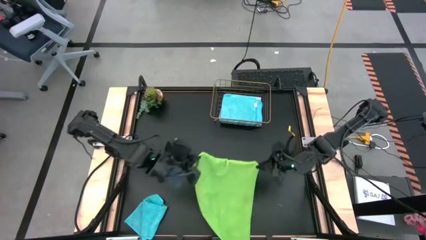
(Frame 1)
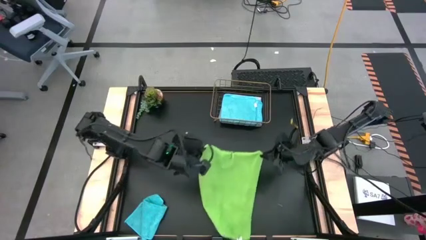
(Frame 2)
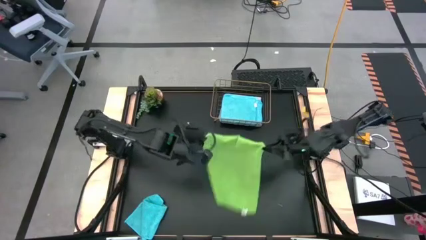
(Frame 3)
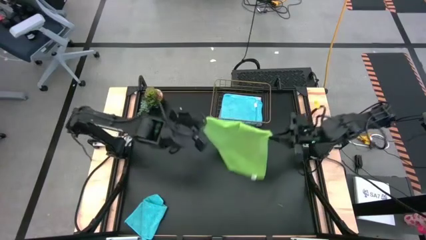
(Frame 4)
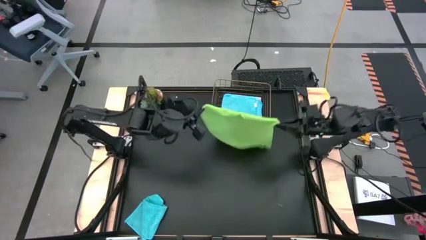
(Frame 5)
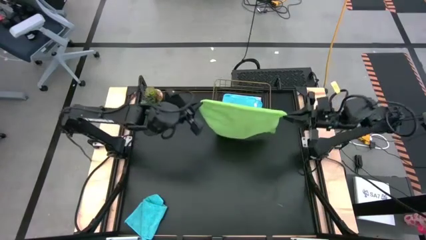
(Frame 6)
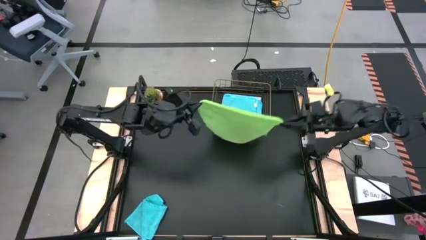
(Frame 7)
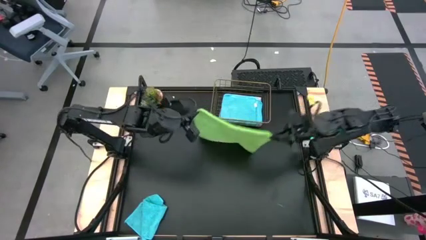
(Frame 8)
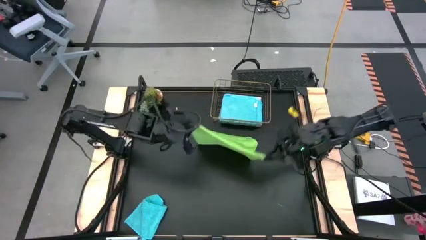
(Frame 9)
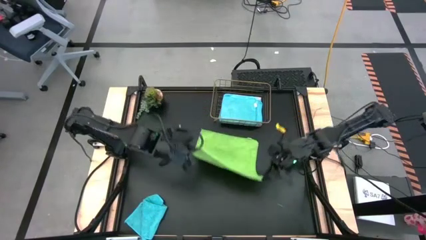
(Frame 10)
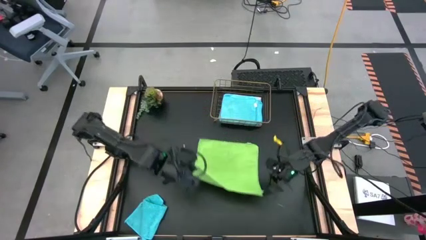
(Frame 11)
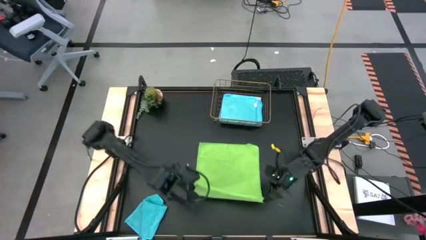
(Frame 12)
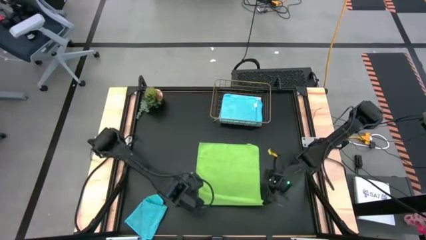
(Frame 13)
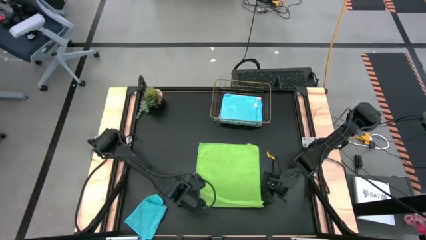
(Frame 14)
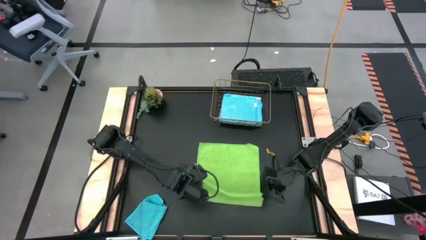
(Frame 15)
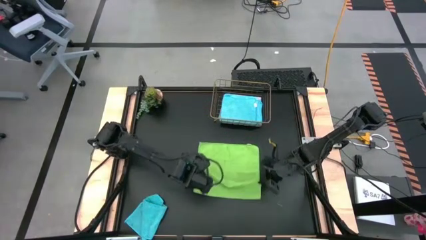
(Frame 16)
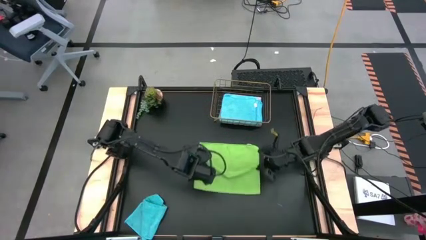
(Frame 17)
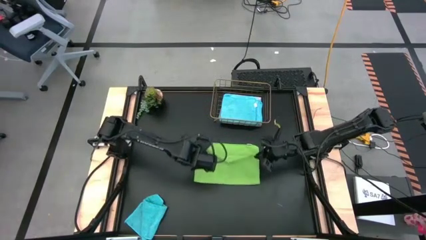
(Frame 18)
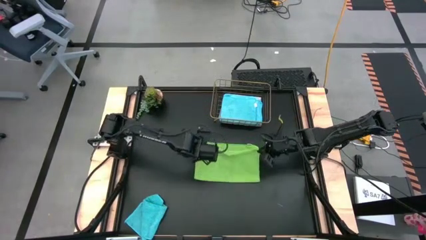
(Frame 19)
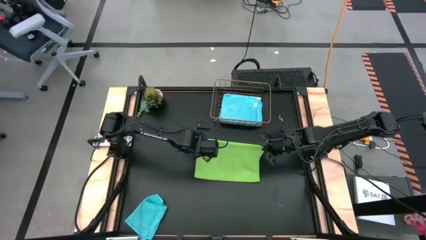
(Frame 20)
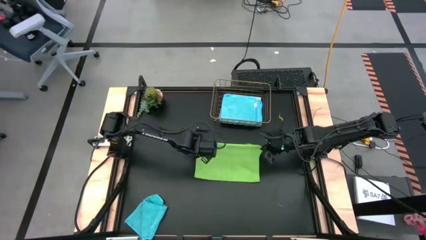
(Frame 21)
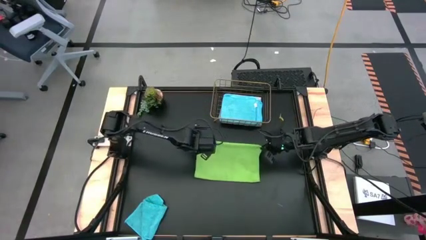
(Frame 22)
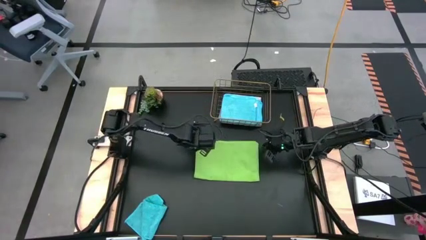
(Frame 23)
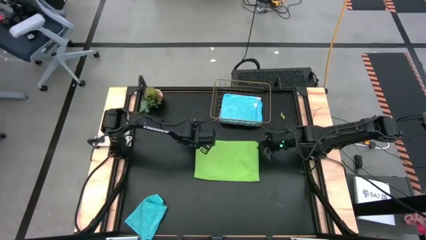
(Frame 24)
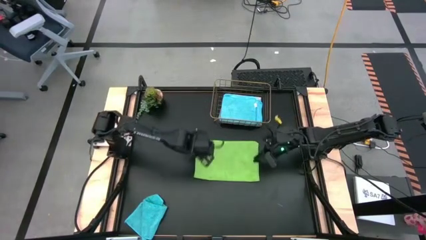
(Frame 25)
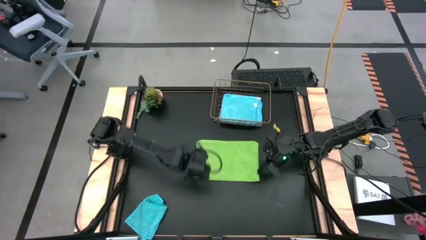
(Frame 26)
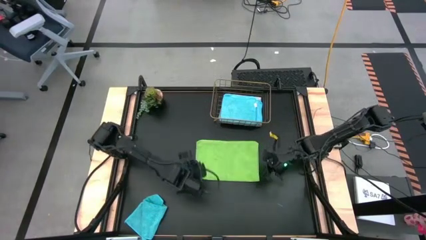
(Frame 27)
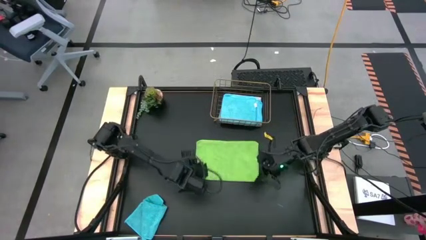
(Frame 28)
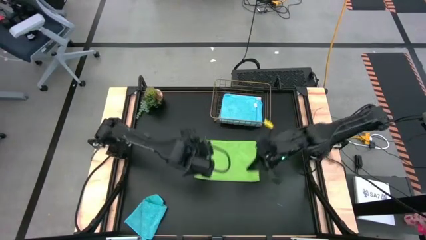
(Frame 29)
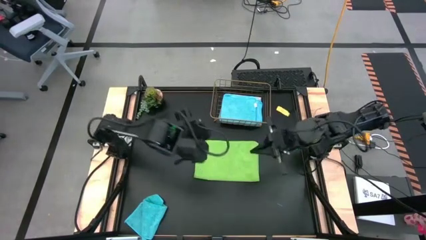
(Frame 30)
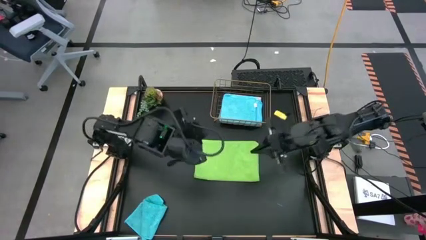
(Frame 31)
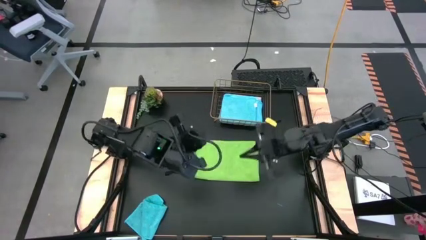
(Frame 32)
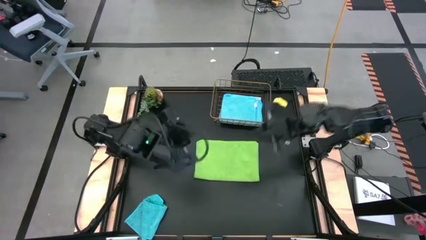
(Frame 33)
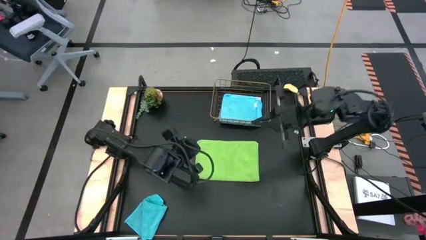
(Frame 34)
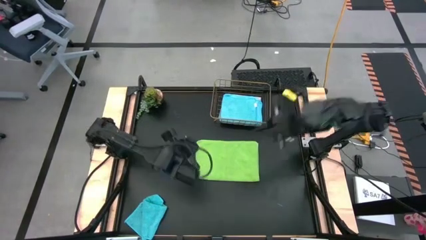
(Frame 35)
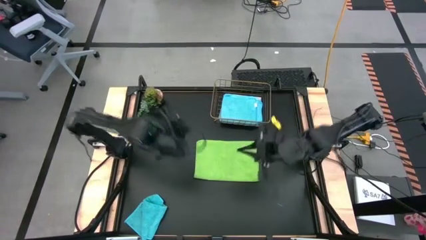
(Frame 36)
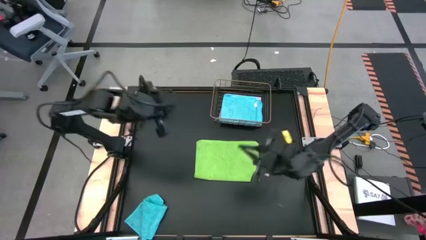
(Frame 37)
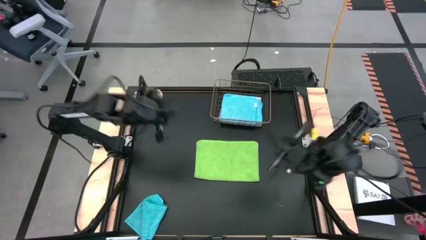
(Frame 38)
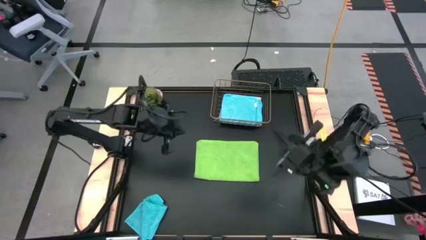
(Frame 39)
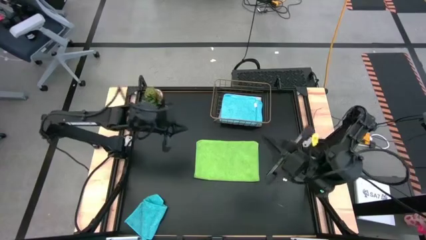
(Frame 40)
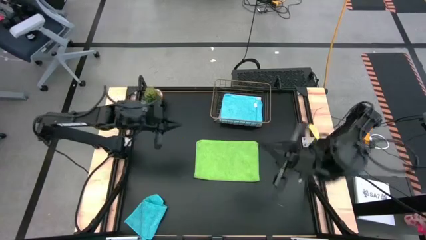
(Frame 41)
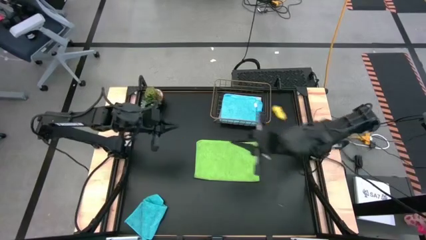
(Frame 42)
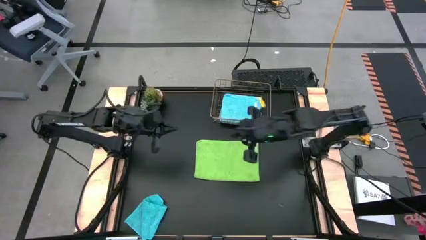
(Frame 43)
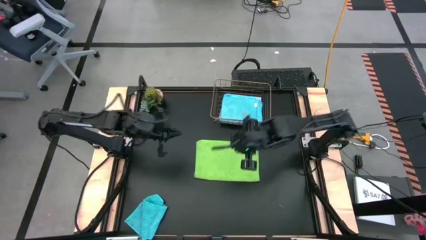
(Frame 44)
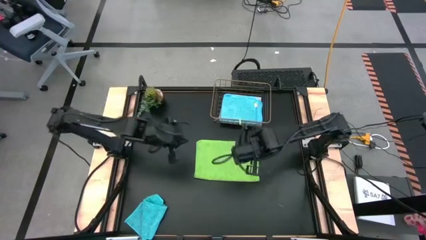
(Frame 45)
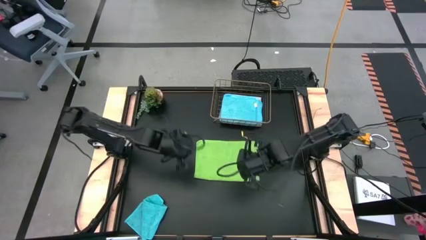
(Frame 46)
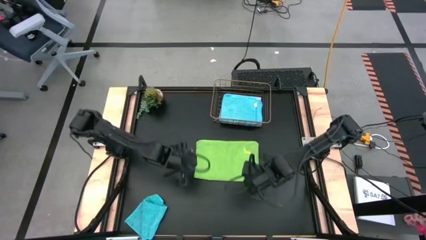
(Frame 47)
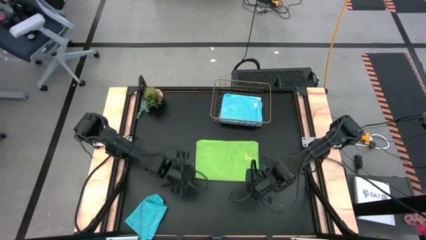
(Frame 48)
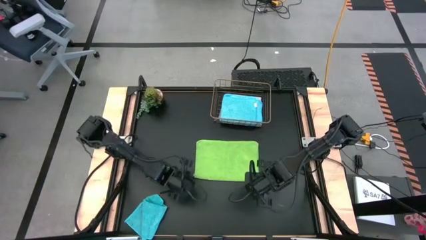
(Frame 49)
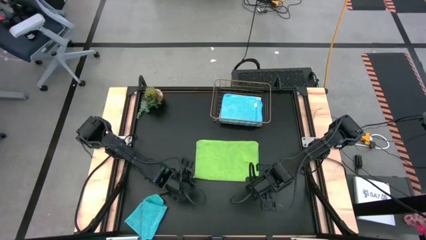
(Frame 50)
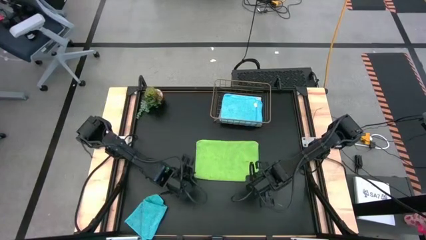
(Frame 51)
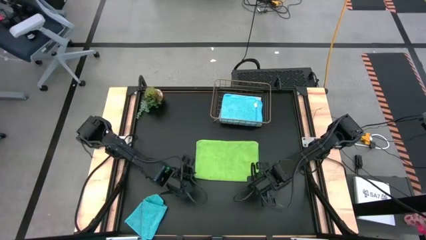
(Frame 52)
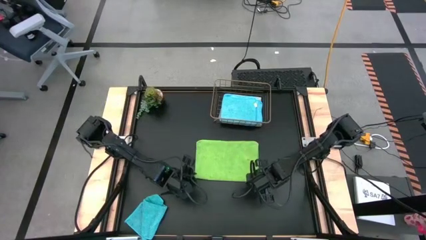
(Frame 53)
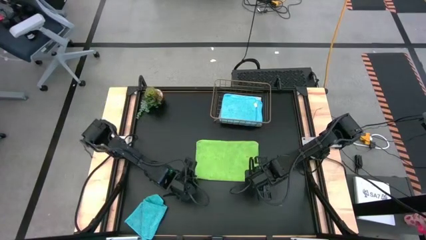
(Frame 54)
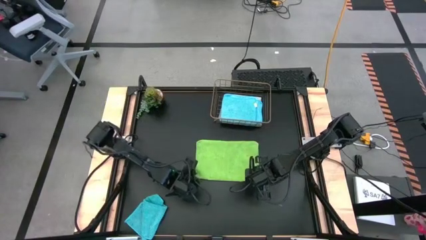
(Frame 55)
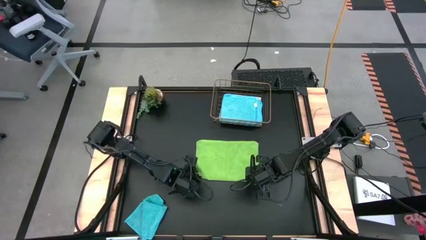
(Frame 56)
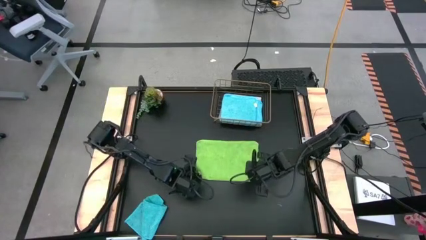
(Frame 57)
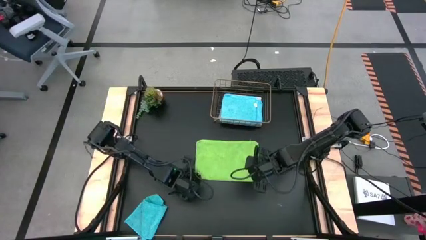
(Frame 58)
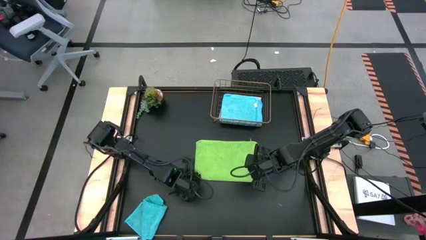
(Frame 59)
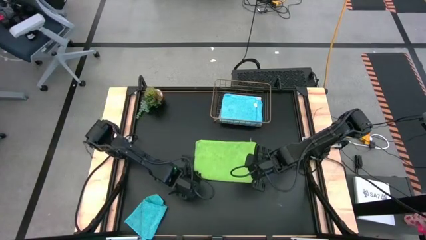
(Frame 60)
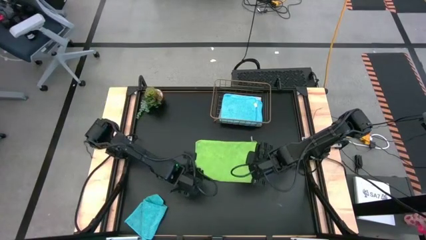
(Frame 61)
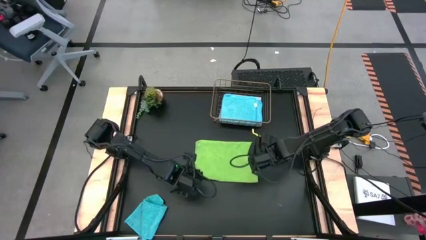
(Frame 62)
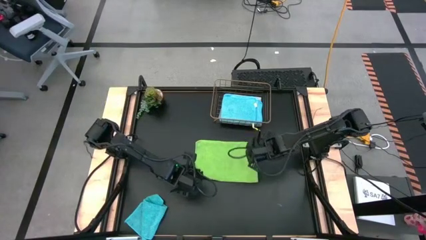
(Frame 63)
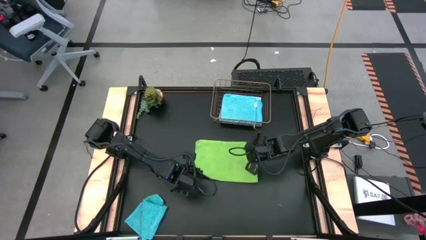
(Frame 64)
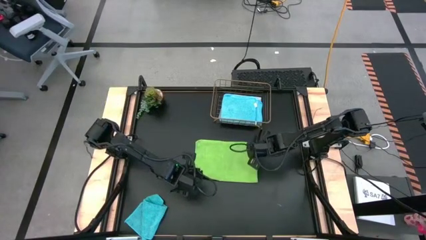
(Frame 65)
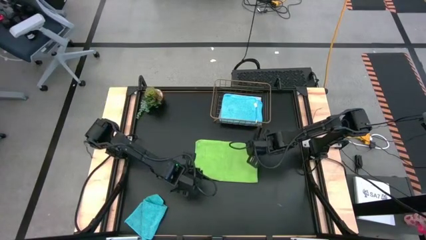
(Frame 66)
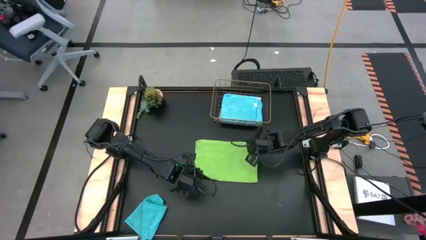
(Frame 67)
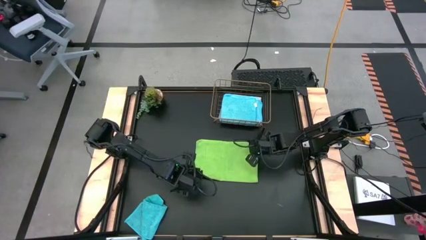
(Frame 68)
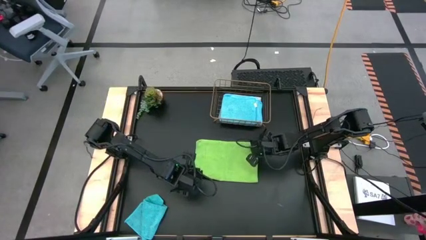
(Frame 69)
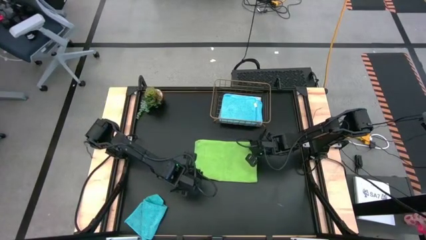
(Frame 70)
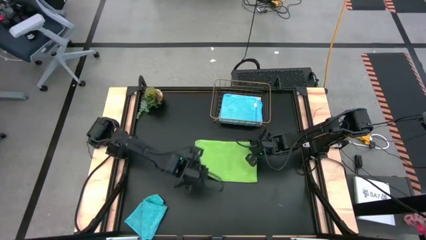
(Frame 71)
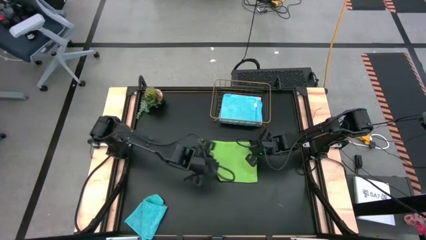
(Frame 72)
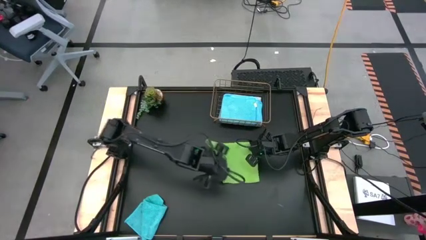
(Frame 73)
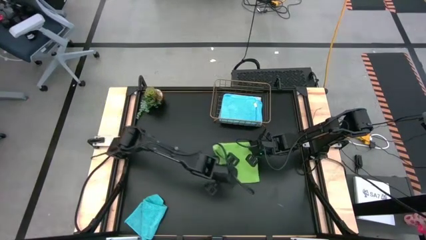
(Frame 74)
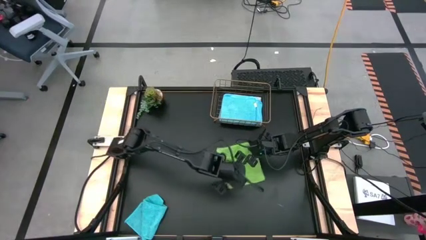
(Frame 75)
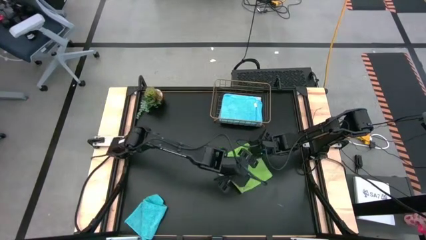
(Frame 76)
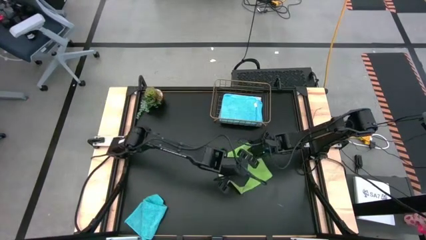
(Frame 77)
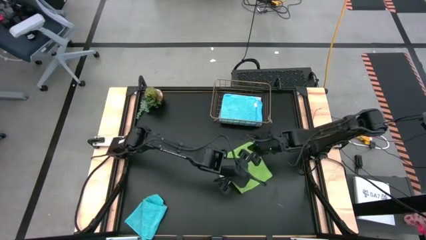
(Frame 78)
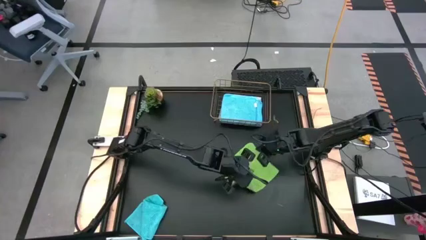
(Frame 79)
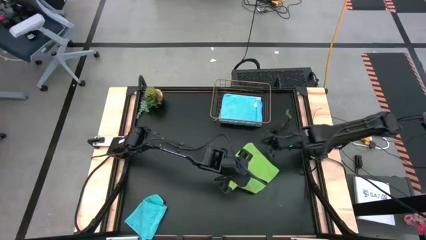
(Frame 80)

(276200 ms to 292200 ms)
Task: Fold microfiber towels
Fold the green towel
